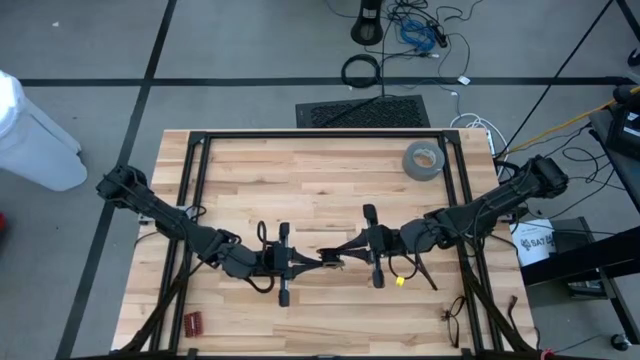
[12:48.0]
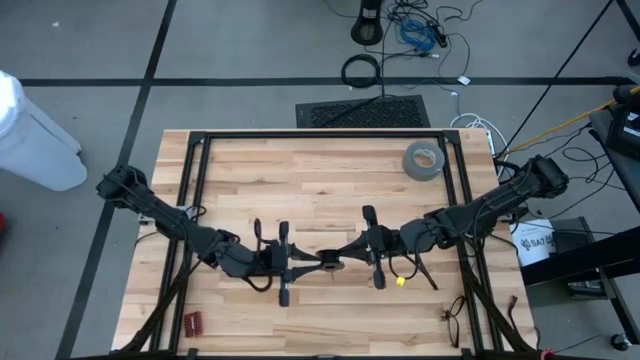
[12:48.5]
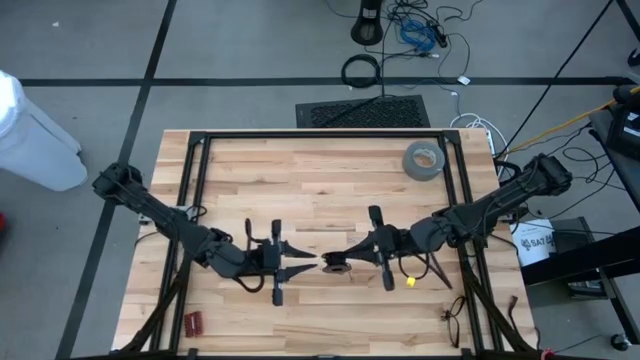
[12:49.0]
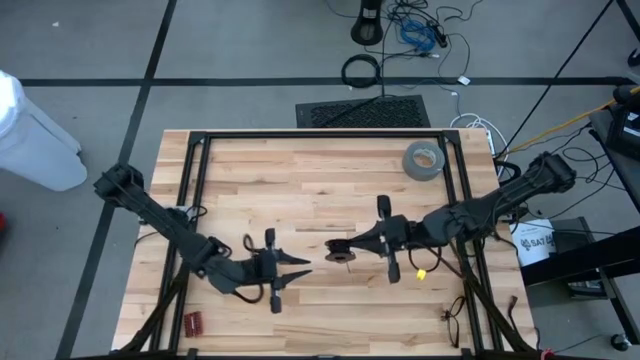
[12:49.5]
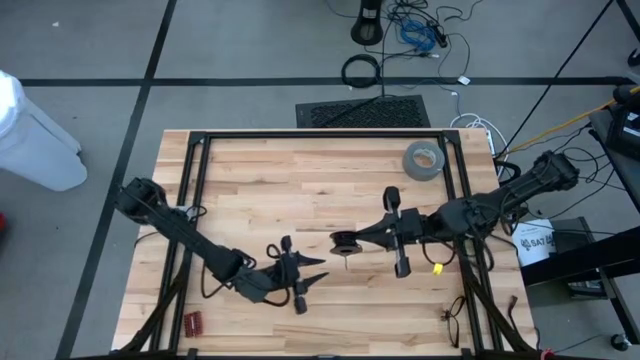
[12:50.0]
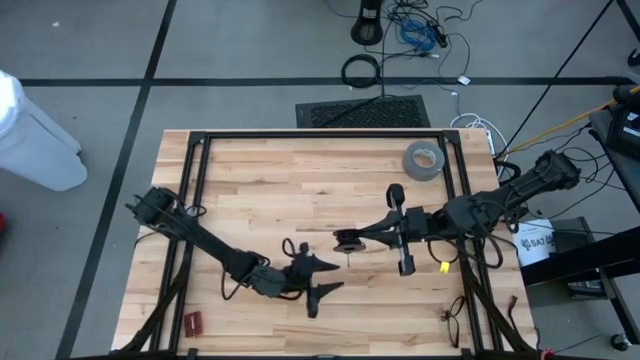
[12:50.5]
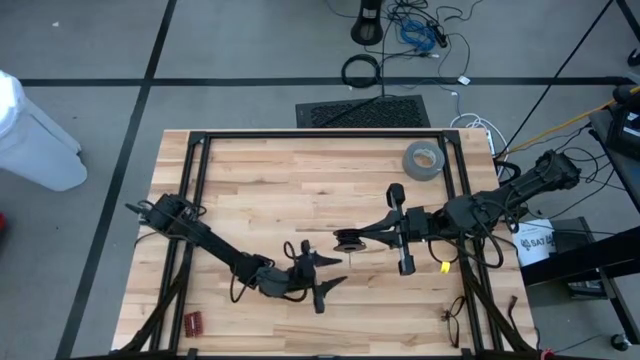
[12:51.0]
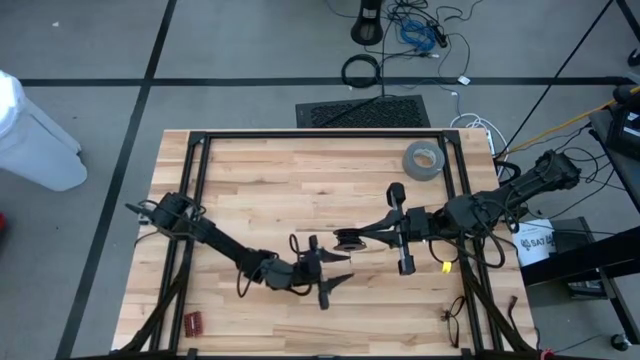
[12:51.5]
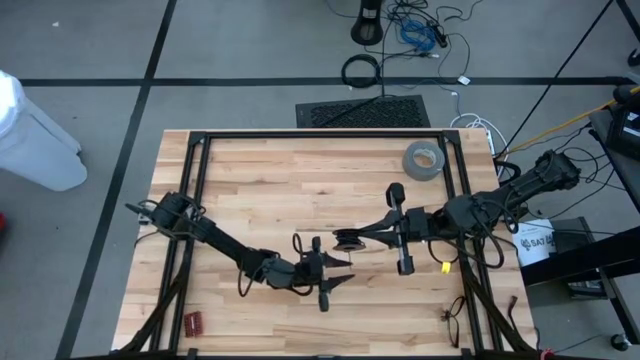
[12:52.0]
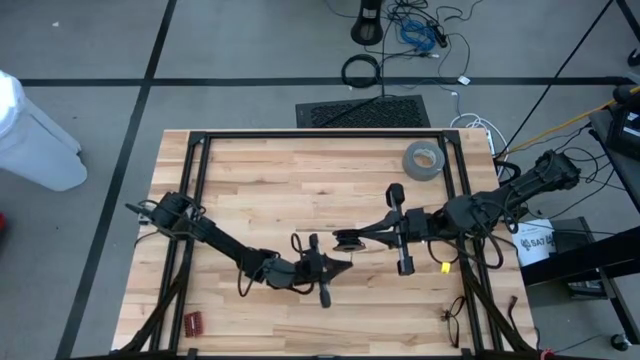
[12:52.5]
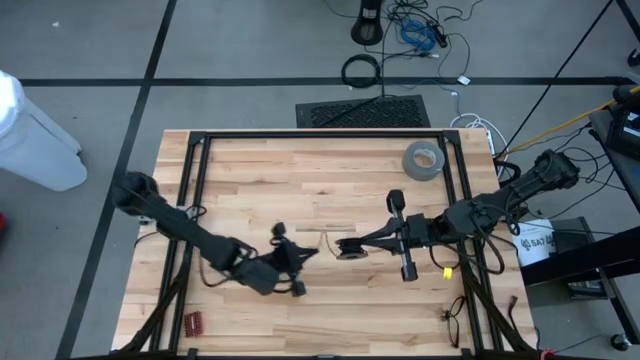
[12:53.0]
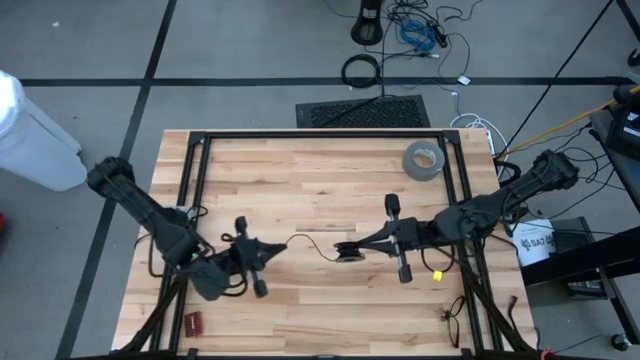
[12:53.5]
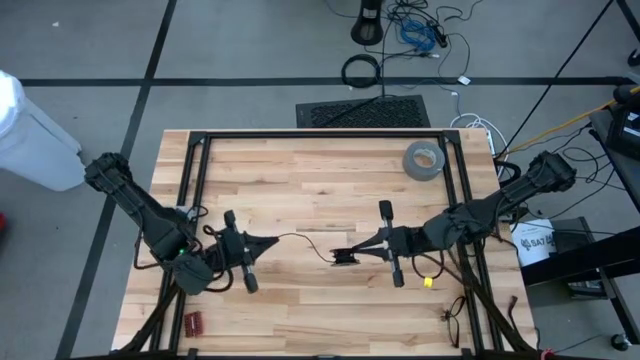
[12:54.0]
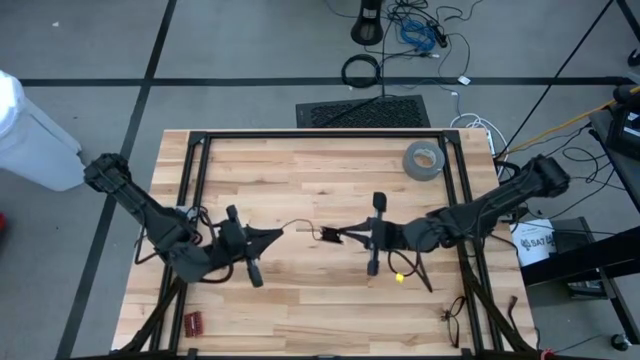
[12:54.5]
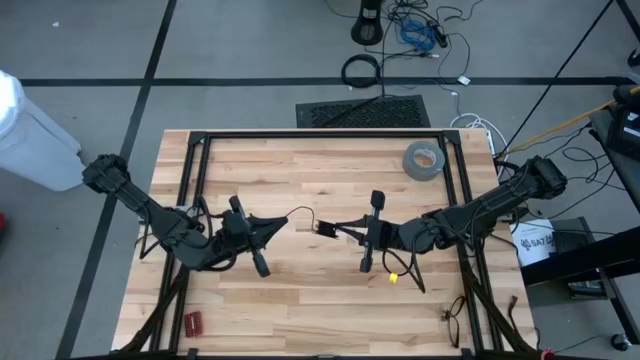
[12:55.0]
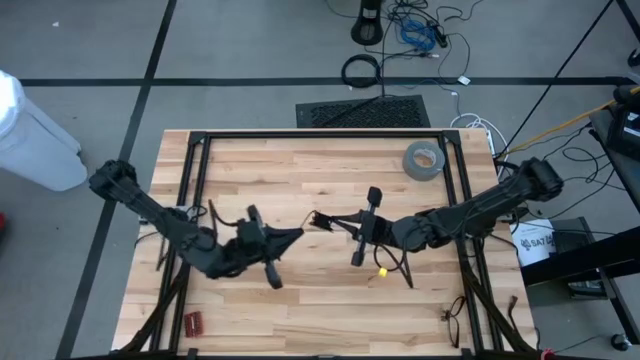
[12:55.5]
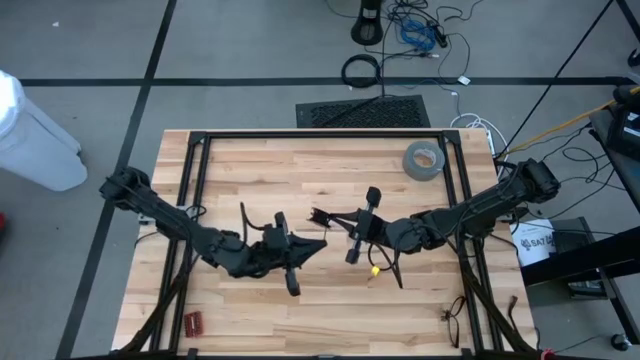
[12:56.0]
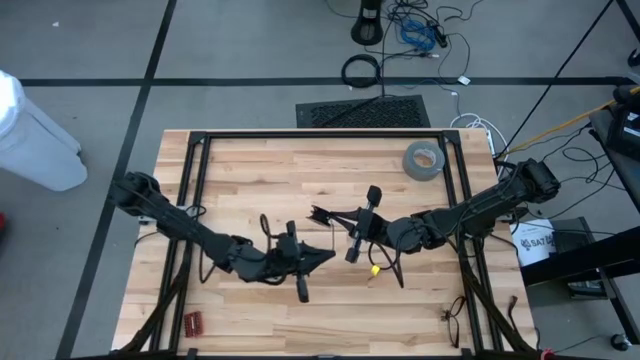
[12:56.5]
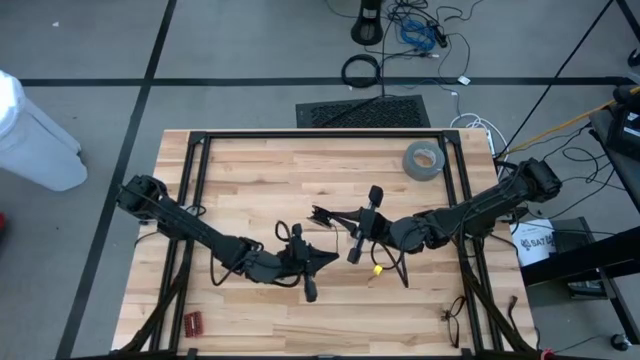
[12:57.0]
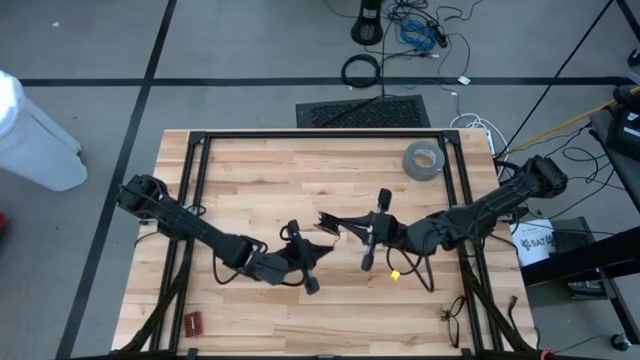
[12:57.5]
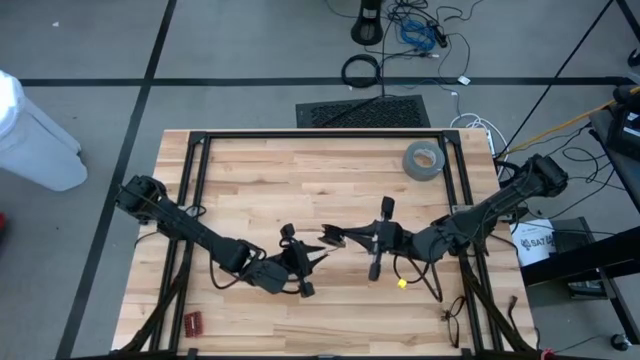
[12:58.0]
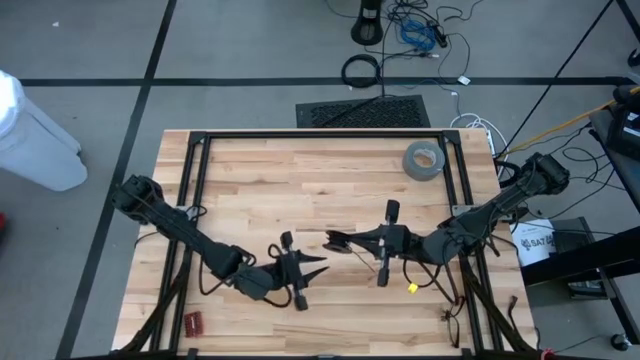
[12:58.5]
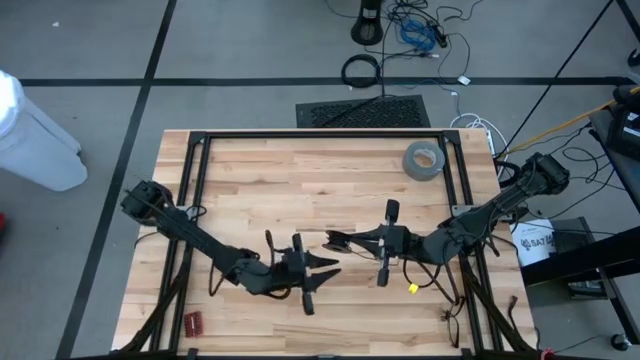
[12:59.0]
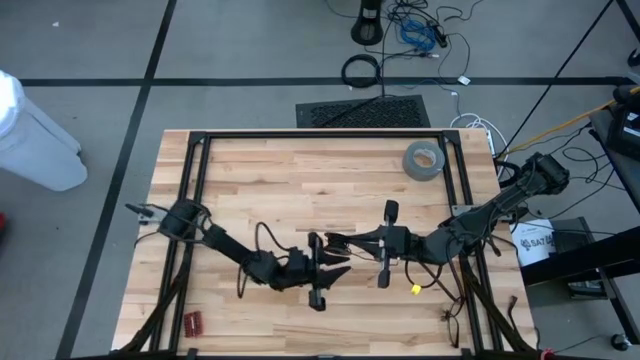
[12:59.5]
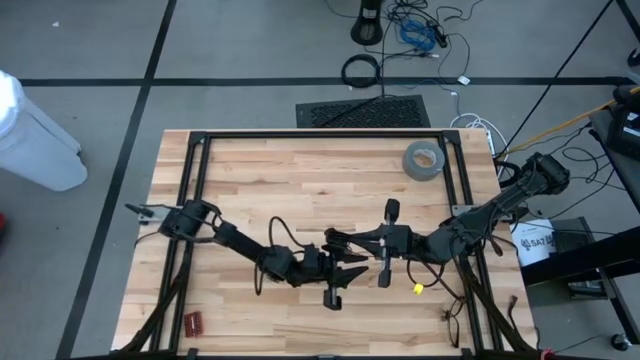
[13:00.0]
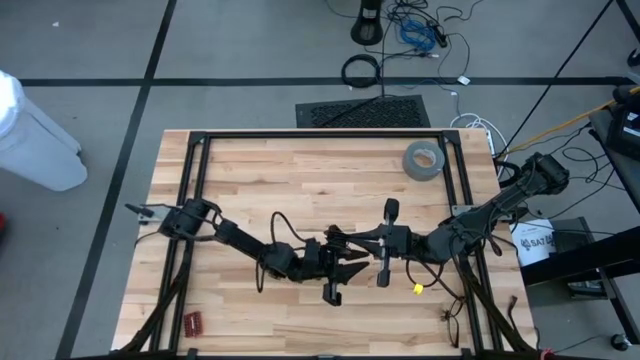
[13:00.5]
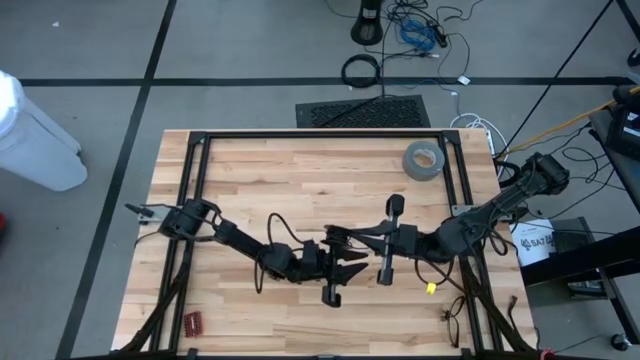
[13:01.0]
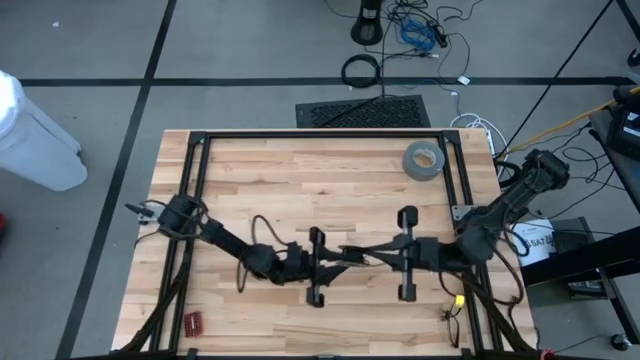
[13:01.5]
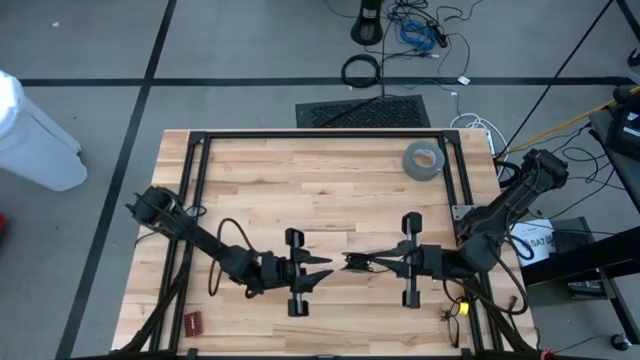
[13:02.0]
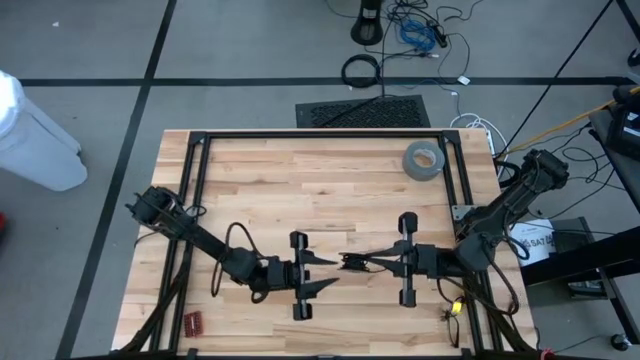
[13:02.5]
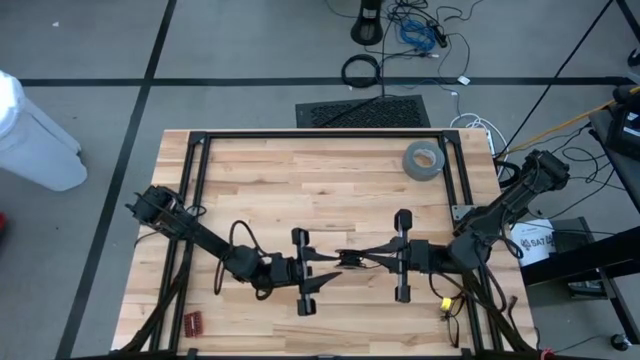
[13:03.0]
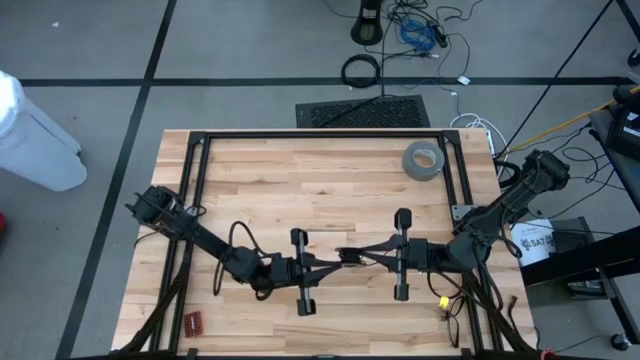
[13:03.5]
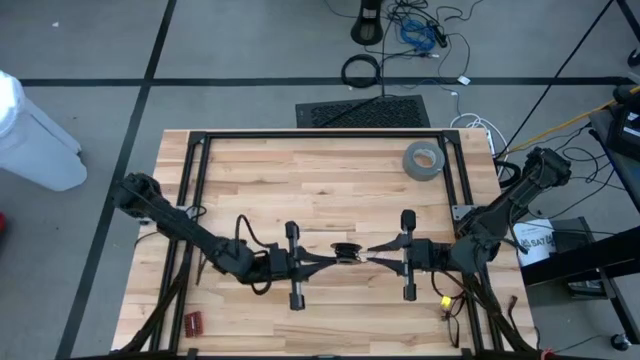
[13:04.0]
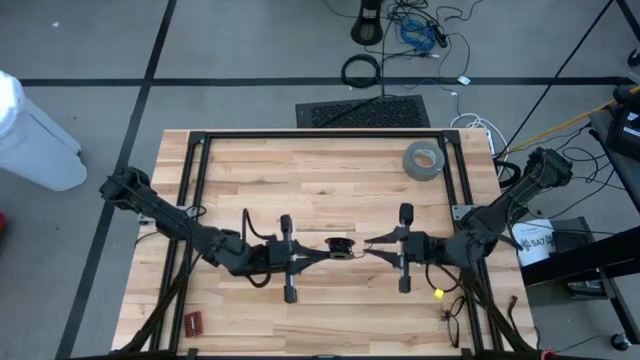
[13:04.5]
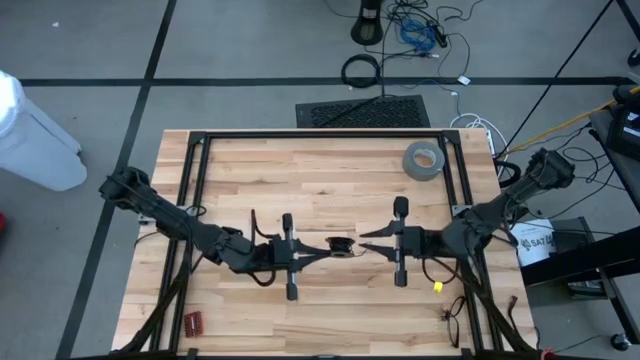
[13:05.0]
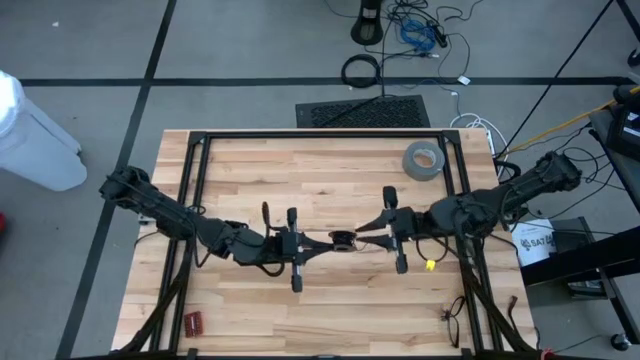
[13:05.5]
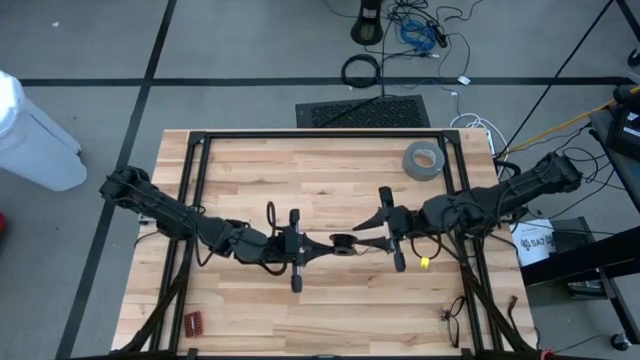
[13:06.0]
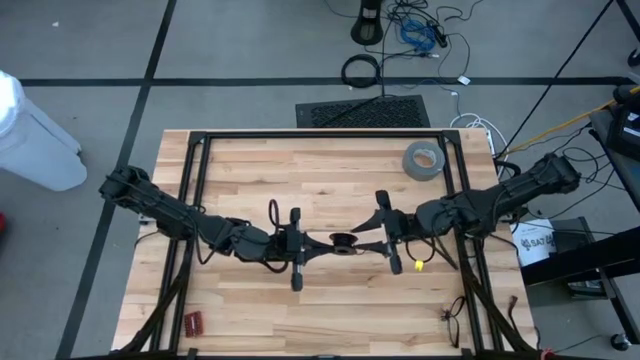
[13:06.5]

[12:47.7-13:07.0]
Task: Coil cords
Coil the black wire onto the spool
